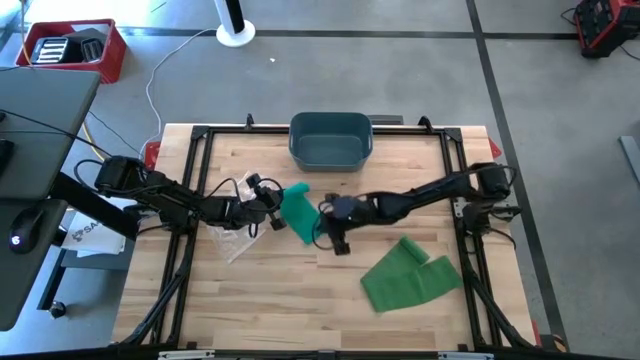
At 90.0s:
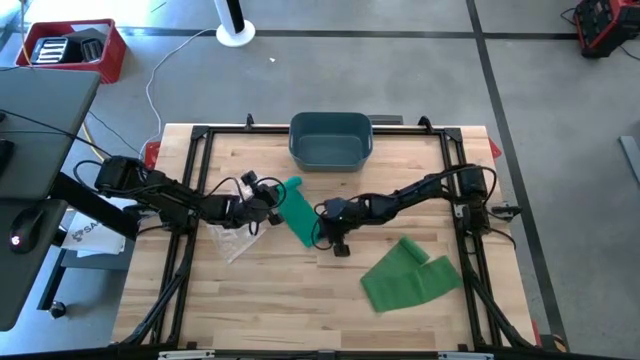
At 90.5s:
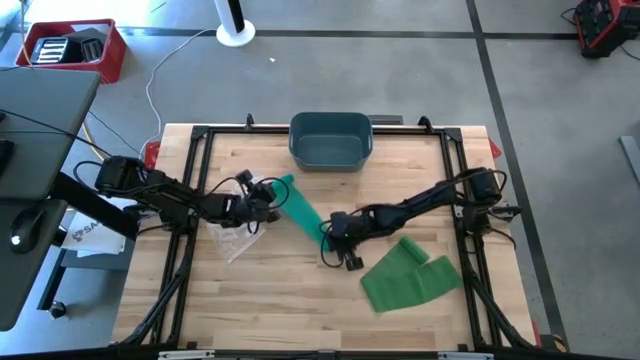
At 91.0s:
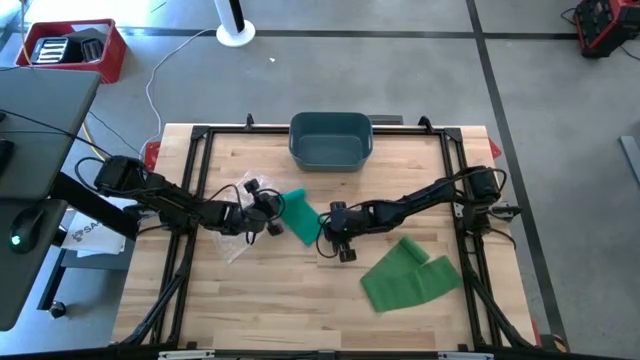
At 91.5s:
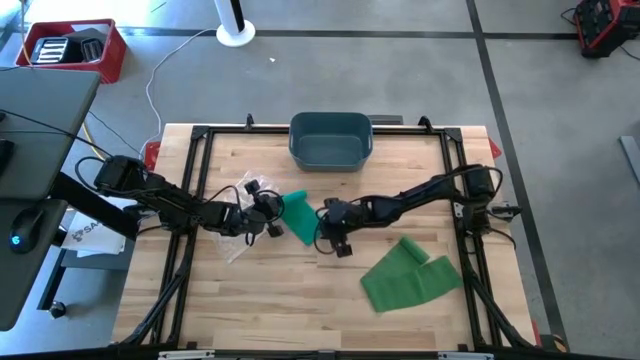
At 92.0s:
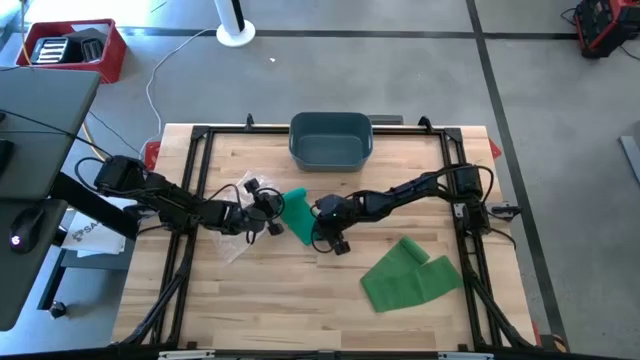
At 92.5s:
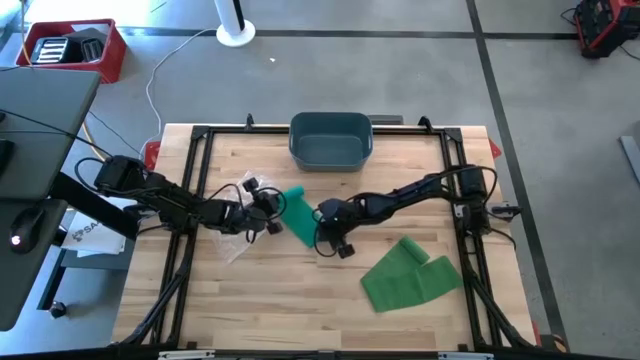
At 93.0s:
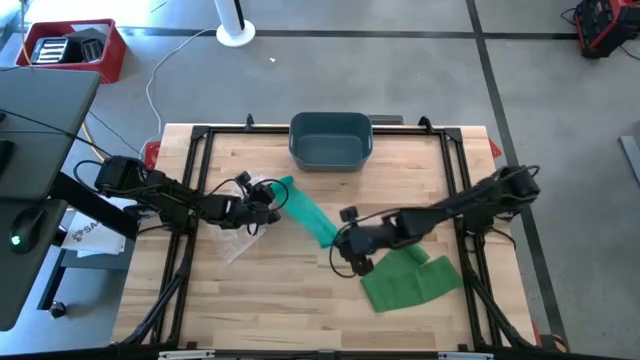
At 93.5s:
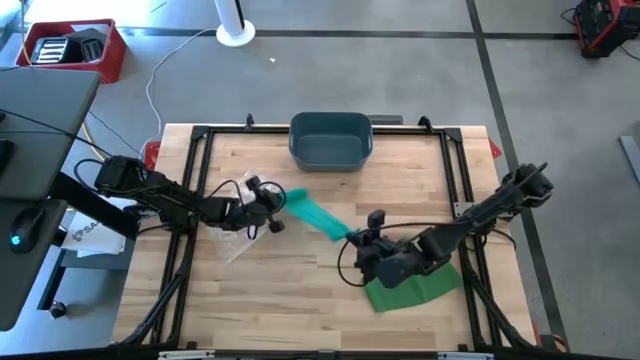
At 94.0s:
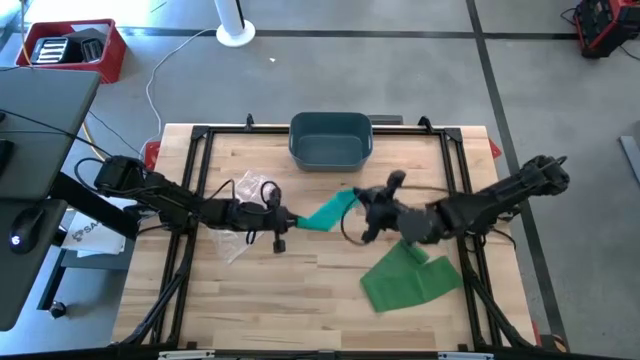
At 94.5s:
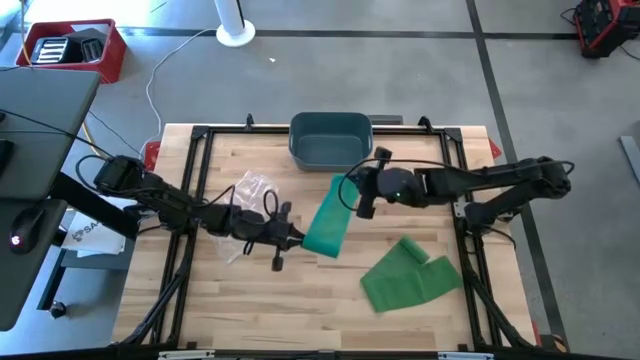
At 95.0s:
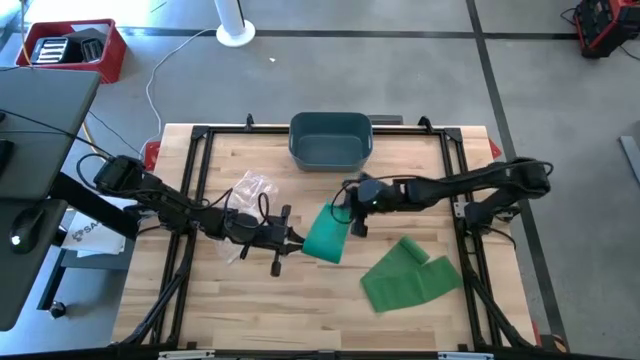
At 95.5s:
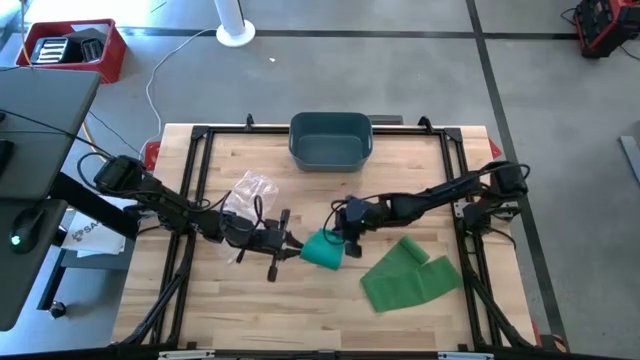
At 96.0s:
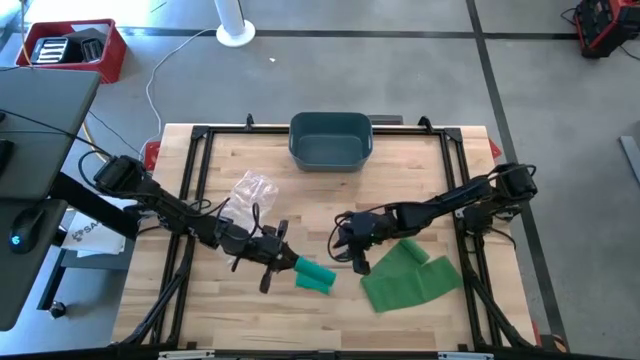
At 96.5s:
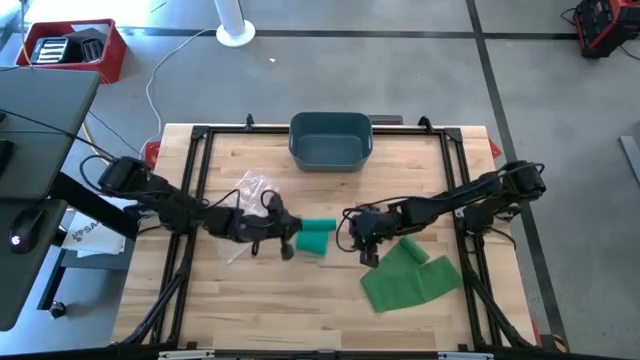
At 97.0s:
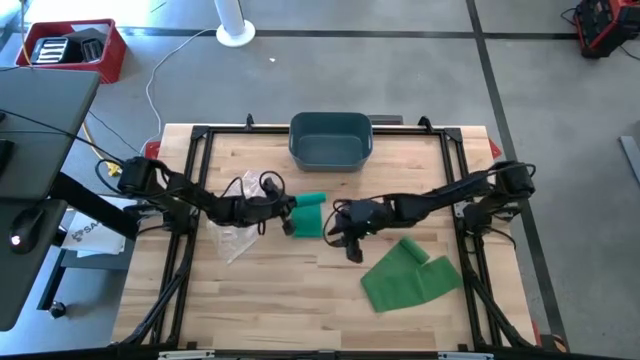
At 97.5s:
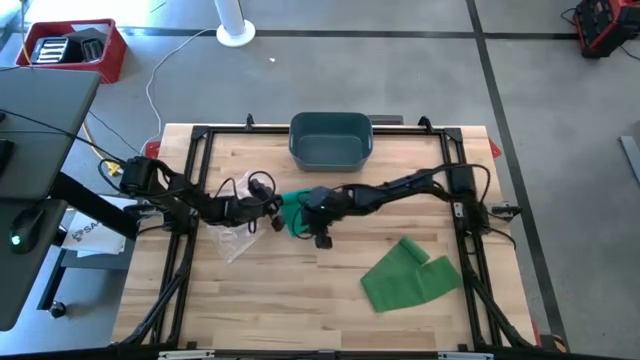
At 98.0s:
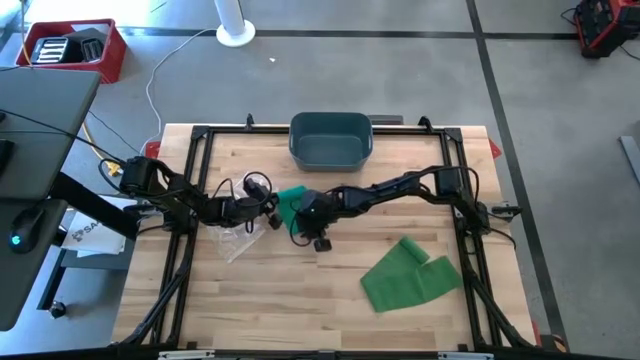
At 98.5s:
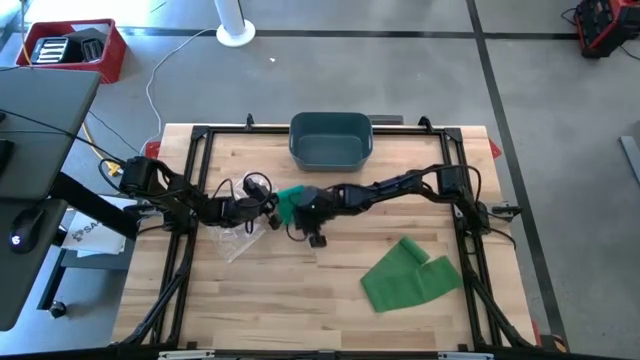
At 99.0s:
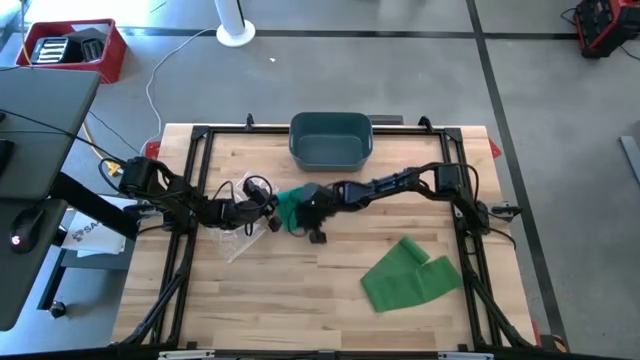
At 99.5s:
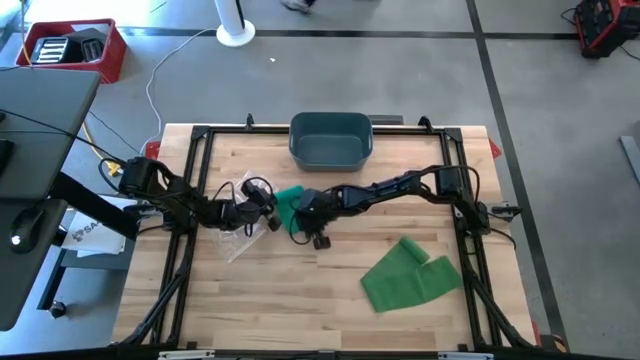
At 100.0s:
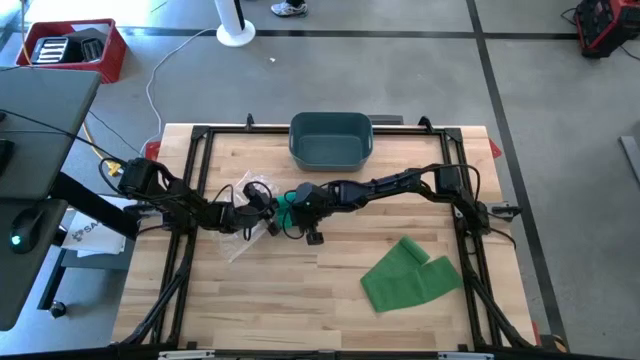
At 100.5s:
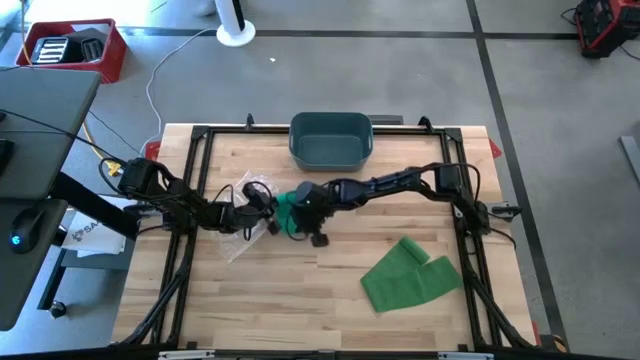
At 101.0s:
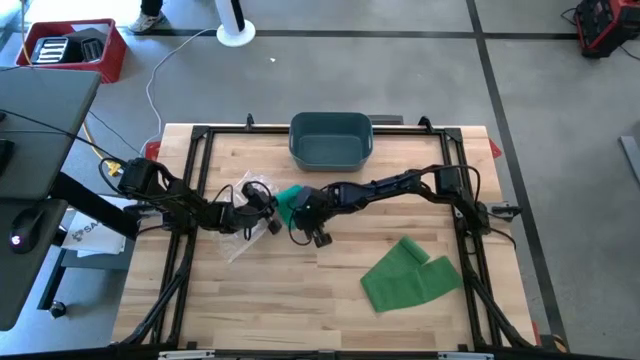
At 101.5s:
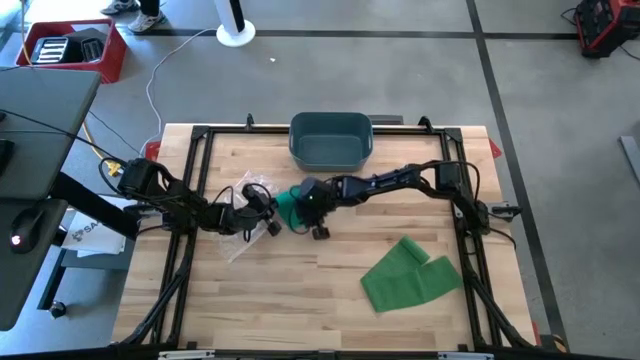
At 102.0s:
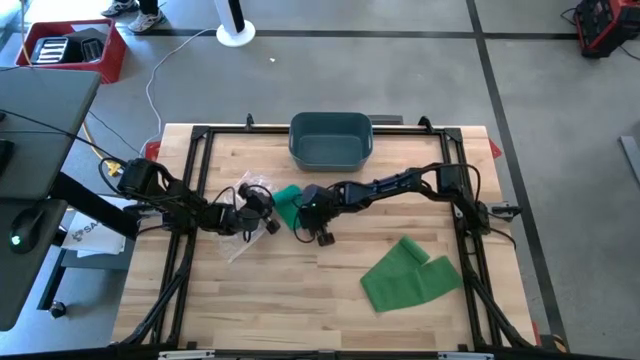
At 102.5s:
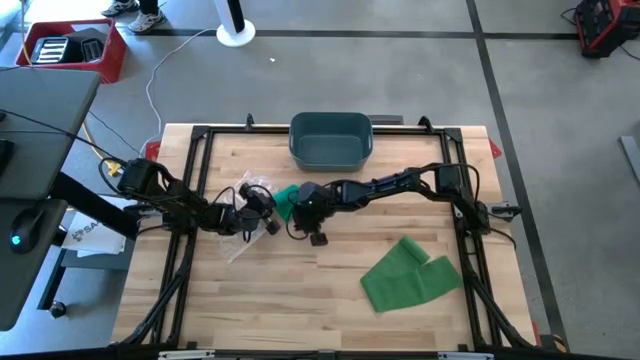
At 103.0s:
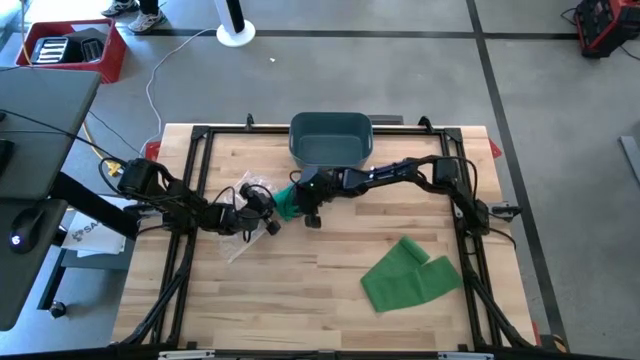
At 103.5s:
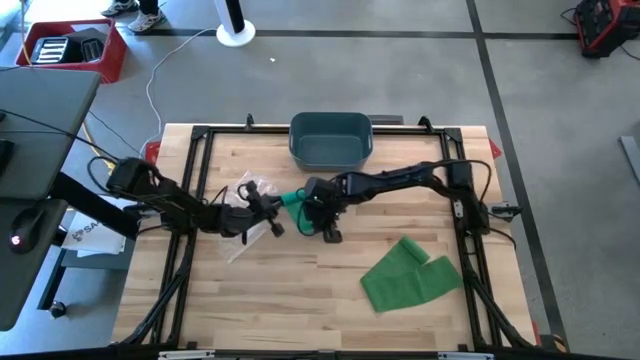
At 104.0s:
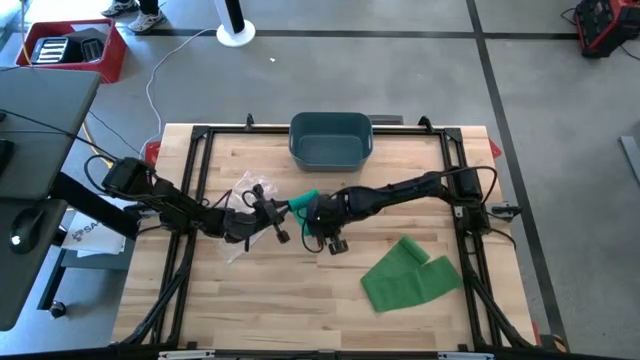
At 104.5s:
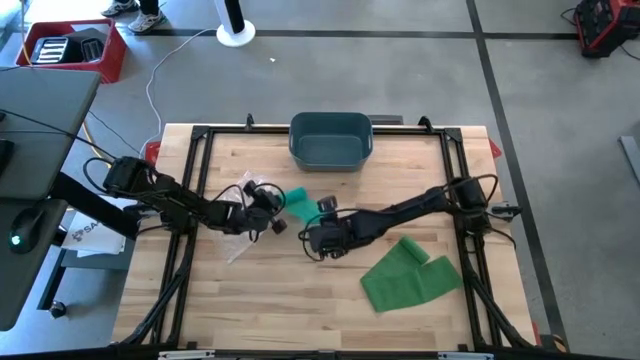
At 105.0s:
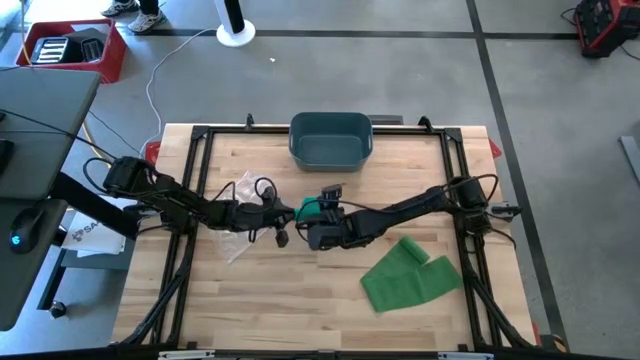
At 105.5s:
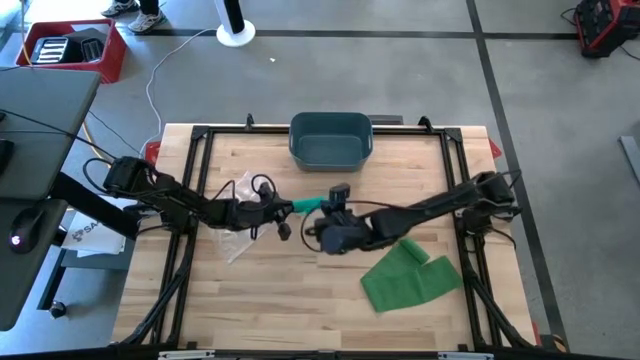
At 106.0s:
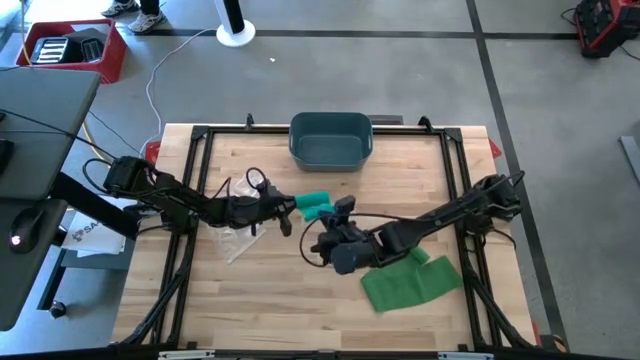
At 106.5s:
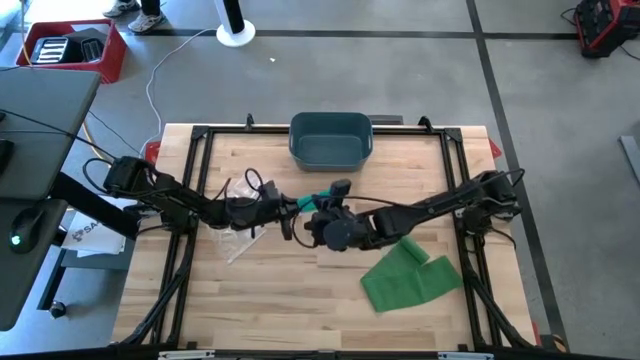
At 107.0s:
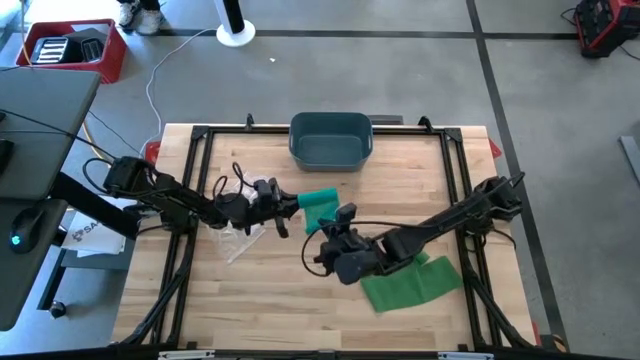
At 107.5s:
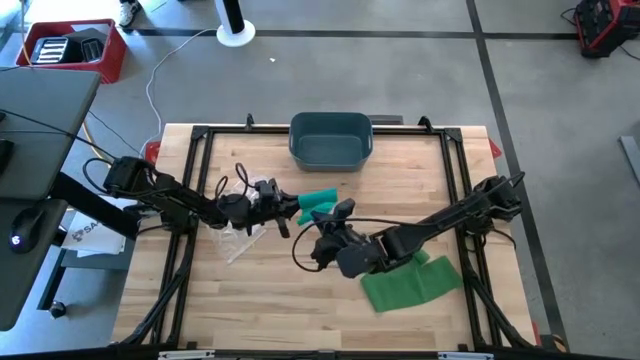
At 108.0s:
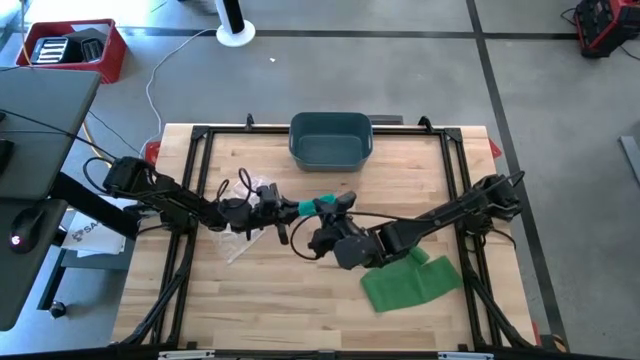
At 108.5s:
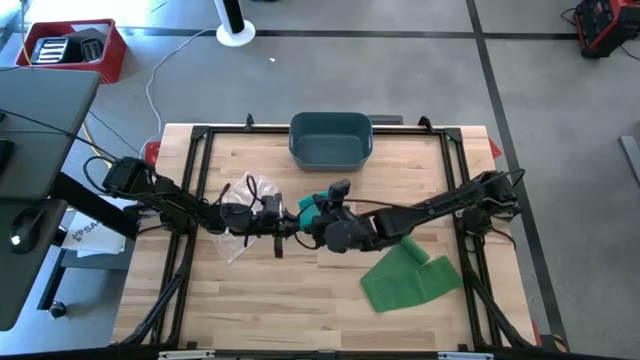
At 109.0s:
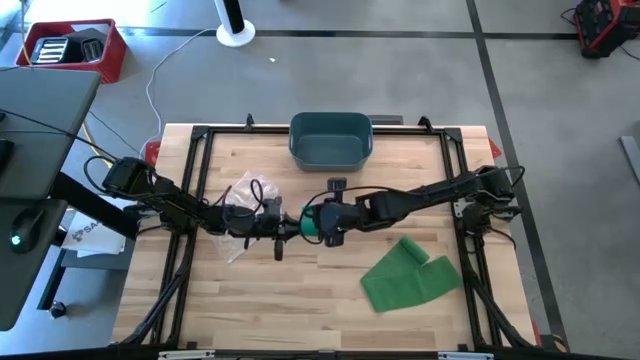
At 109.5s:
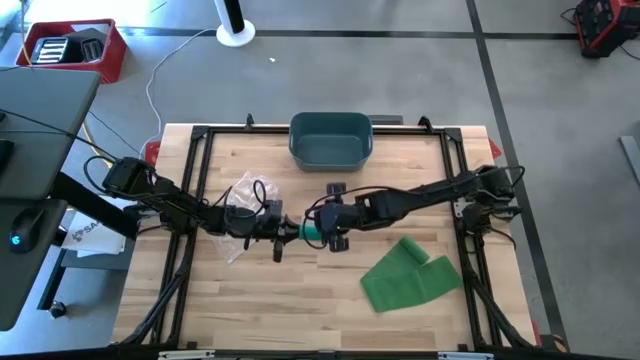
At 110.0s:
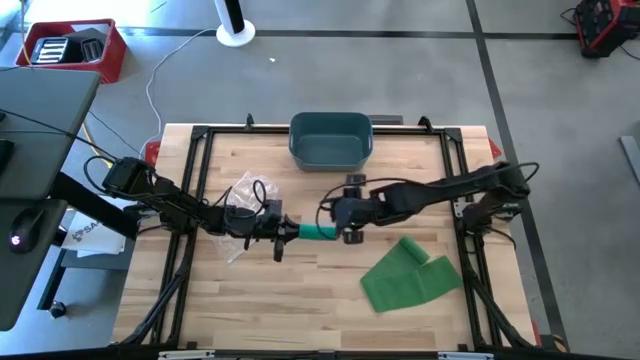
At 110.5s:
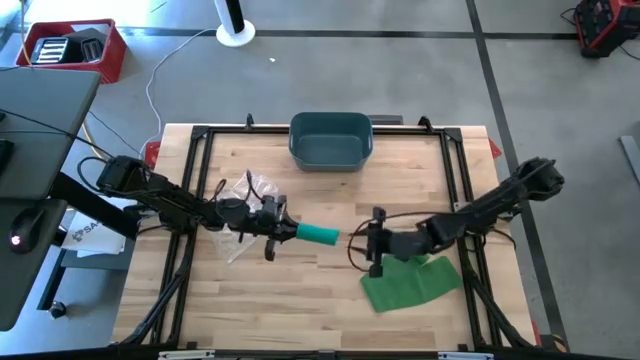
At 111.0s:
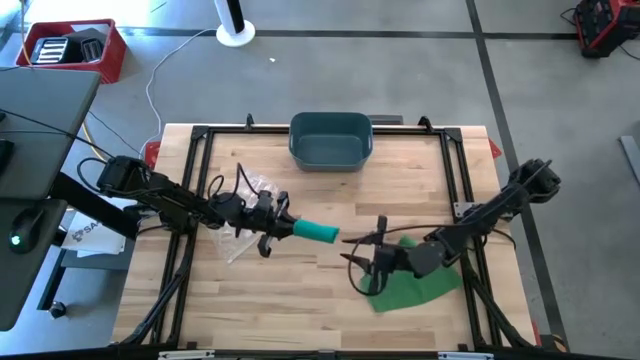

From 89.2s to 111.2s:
Task: Roll bandage
Roll the blue bandage
